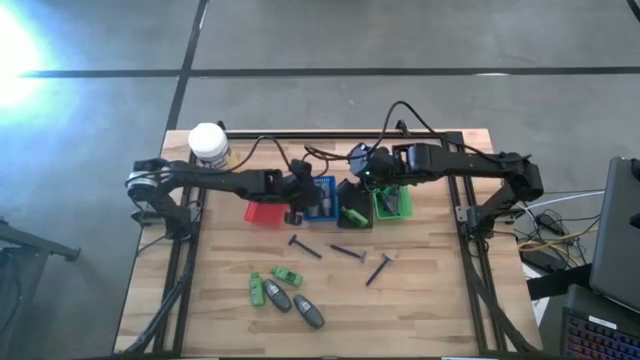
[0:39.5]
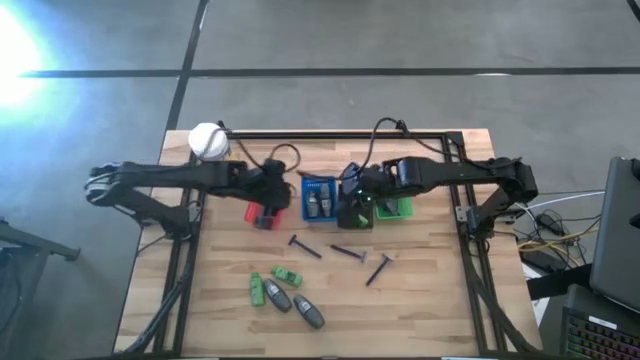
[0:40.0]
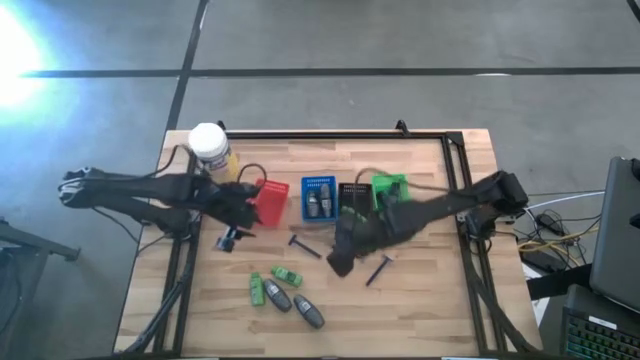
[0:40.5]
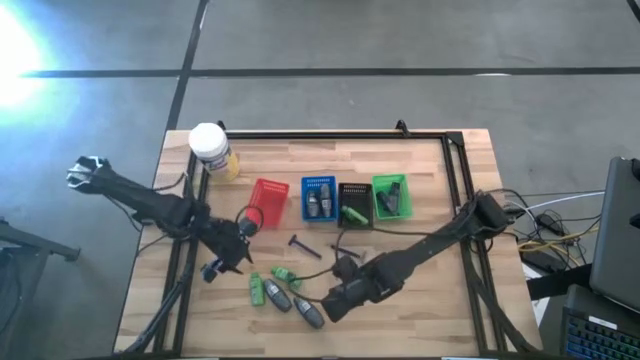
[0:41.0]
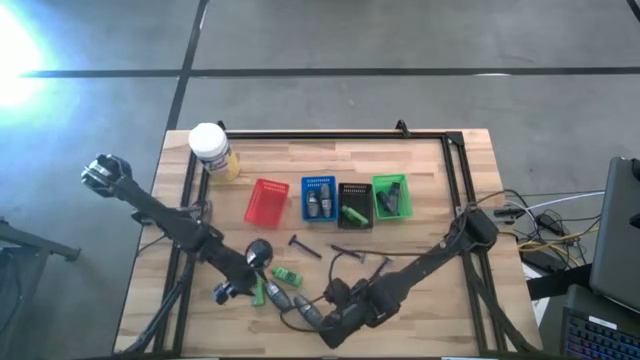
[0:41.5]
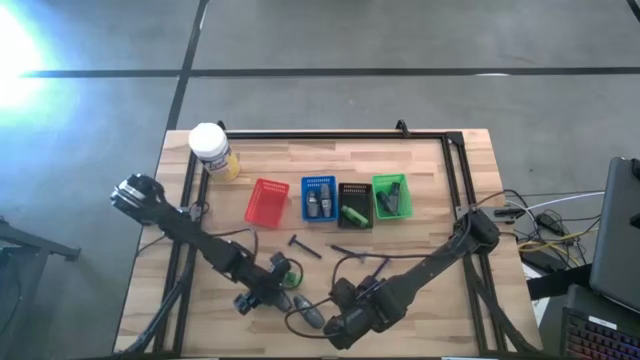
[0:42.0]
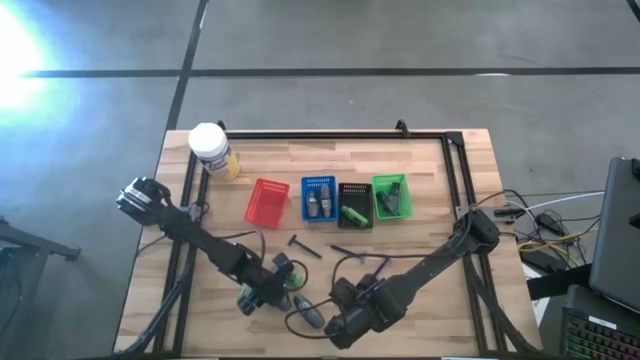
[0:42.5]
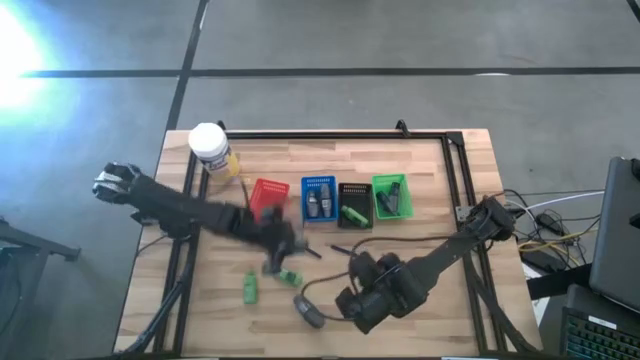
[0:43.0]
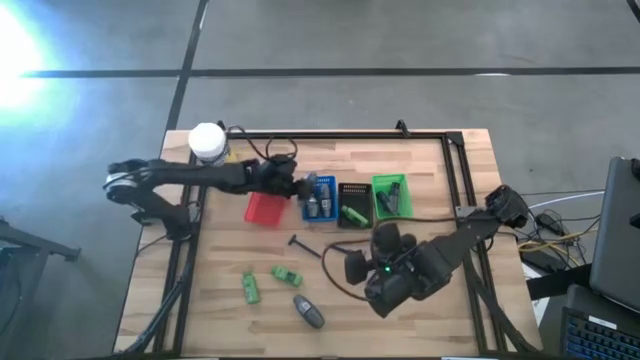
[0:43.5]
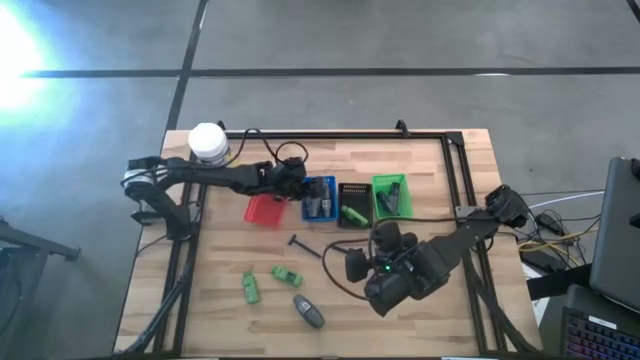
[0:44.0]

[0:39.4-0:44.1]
Task: Pick & Place Travel size toiletries
Put the black deodorant into the blue basket

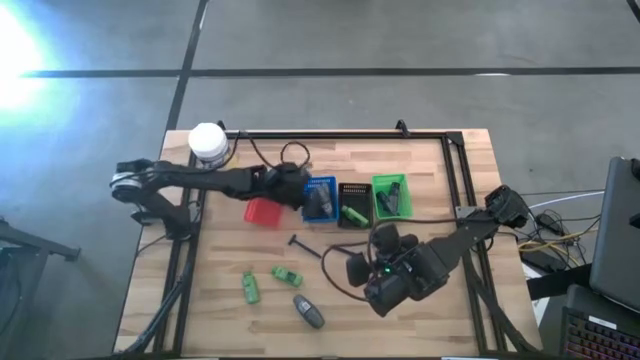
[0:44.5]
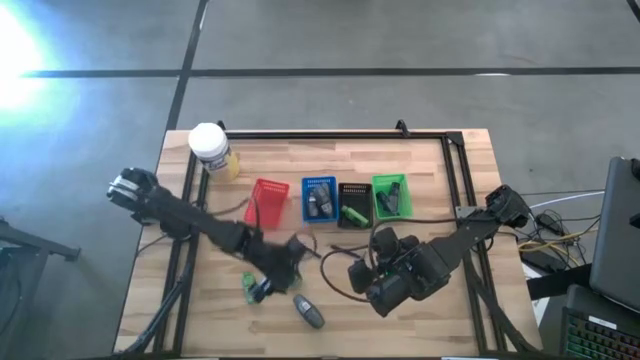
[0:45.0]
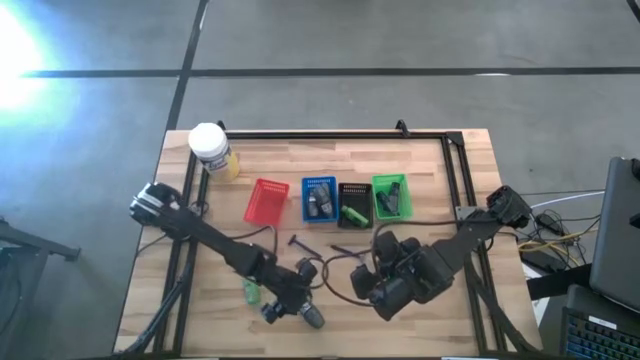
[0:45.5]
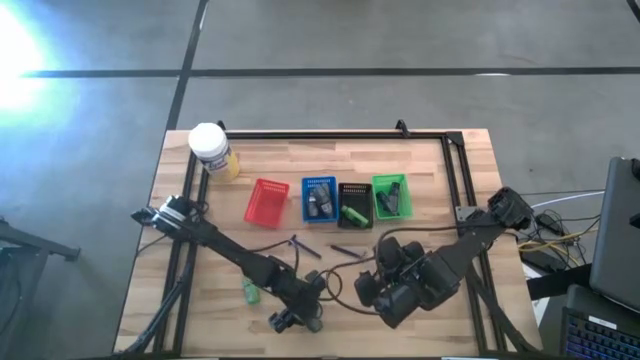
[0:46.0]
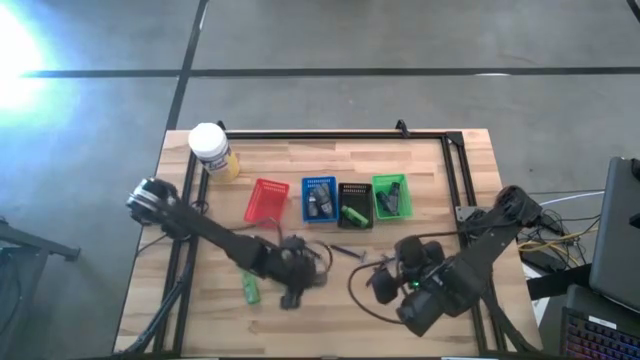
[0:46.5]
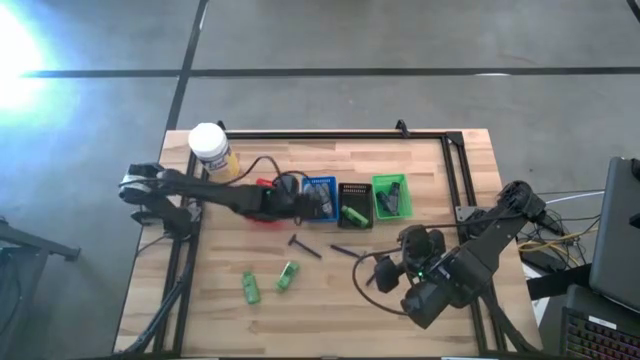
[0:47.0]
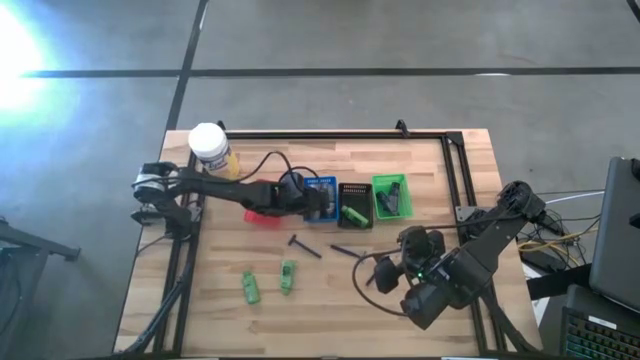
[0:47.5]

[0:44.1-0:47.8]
Put the black deodorant into the blue basket

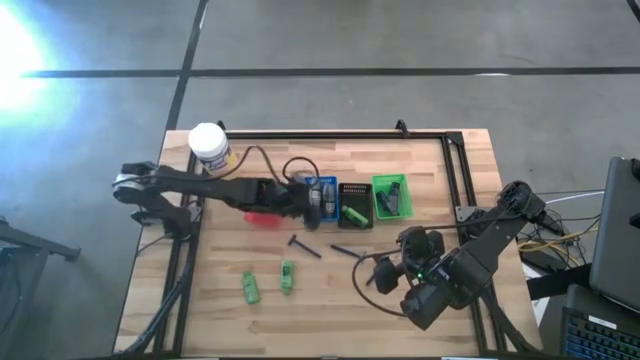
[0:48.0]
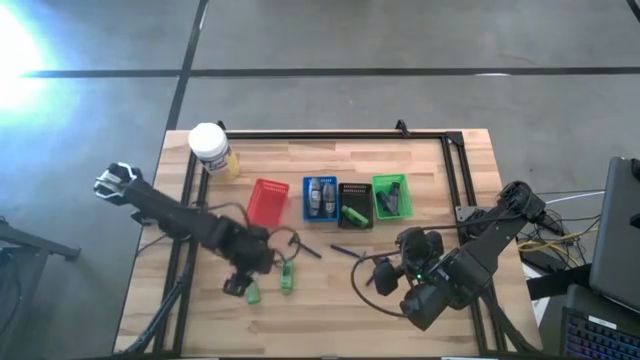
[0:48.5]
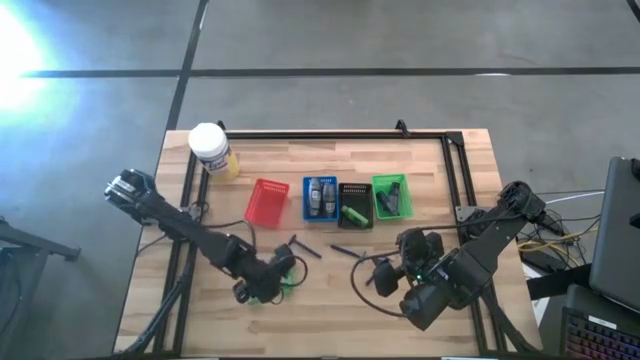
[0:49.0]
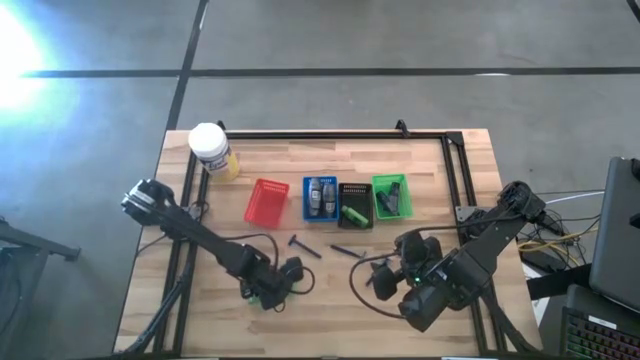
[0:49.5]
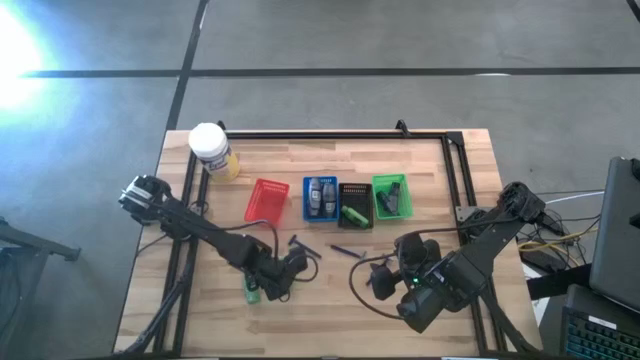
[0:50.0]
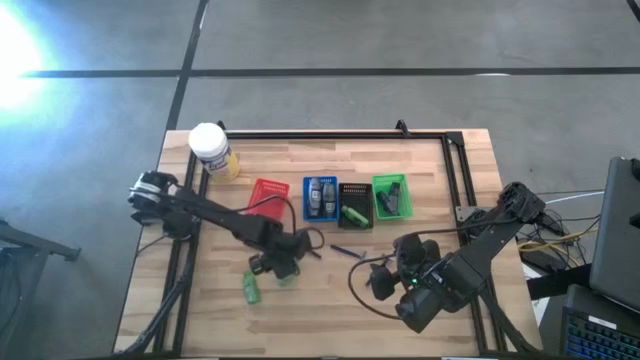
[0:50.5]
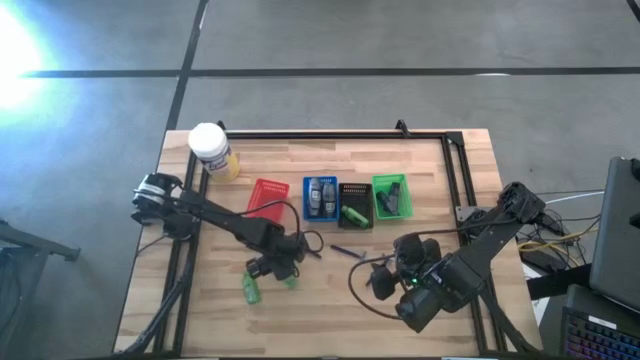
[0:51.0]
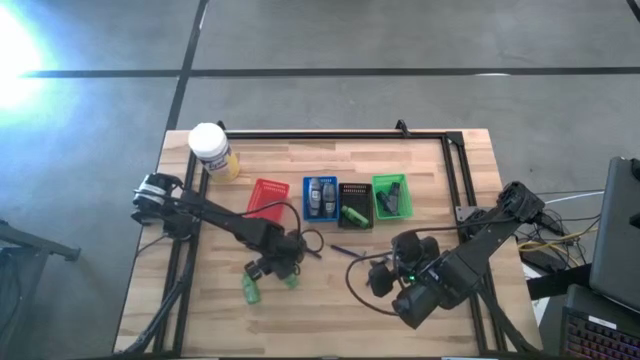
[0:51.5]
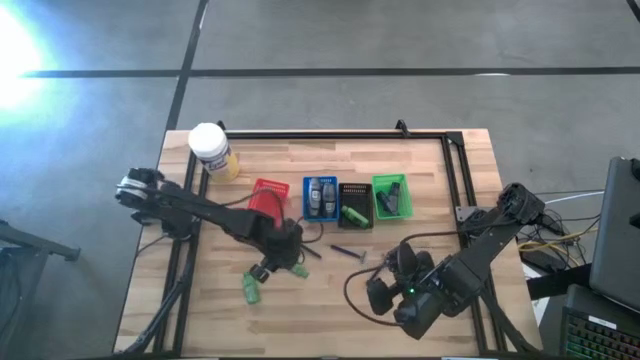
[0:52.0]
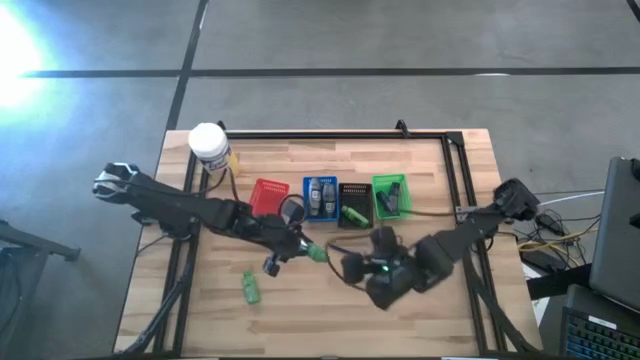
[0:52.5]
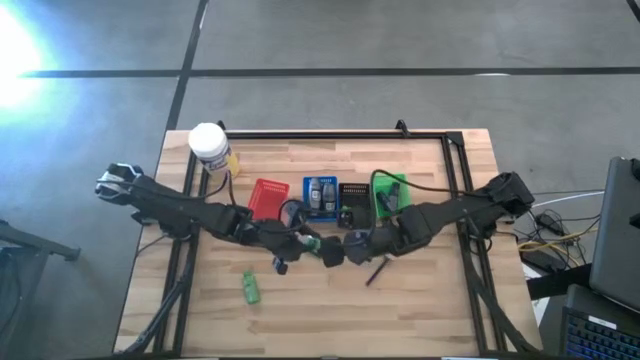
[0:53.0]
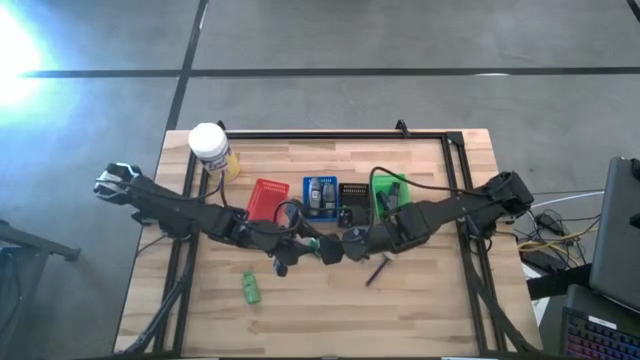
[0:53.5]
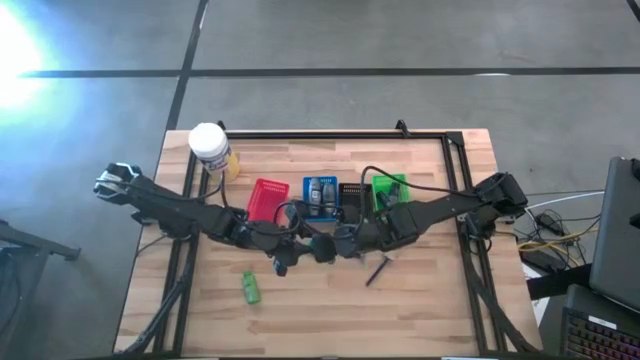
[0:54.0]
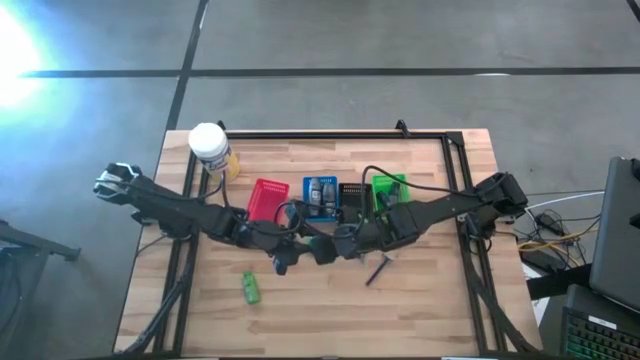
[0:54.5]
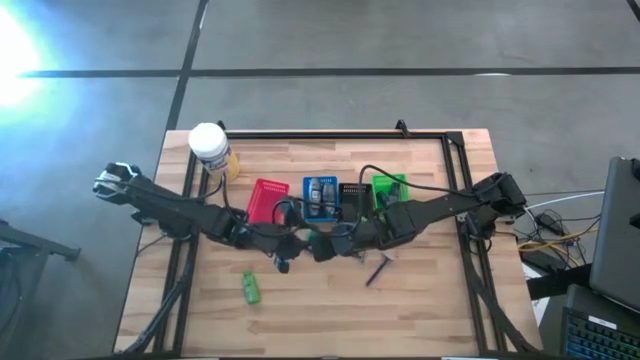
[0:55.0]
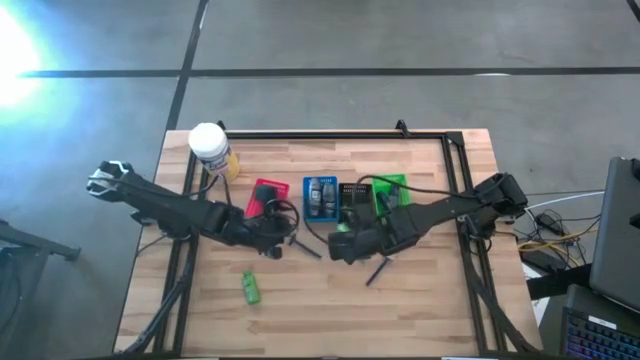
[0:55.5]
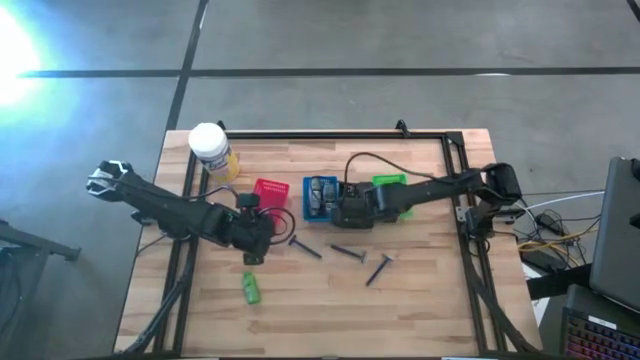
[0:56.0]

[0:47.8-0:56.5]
Put the green shampoo into the black basket

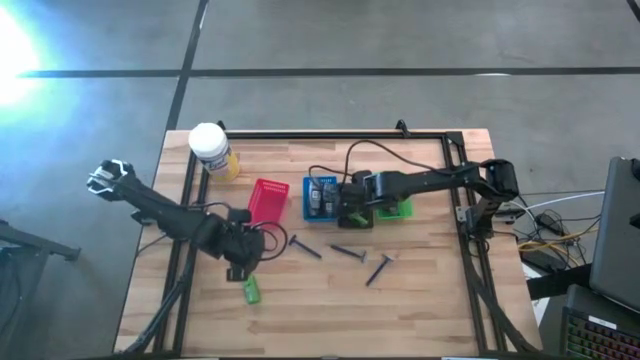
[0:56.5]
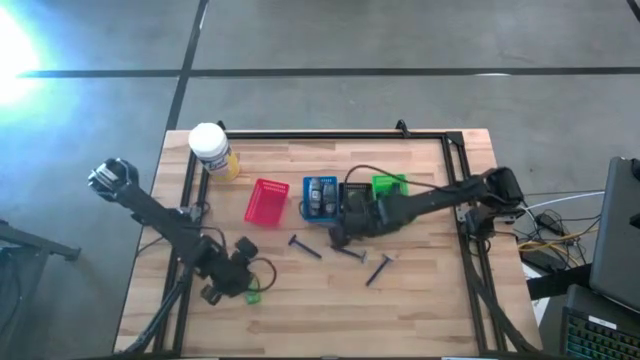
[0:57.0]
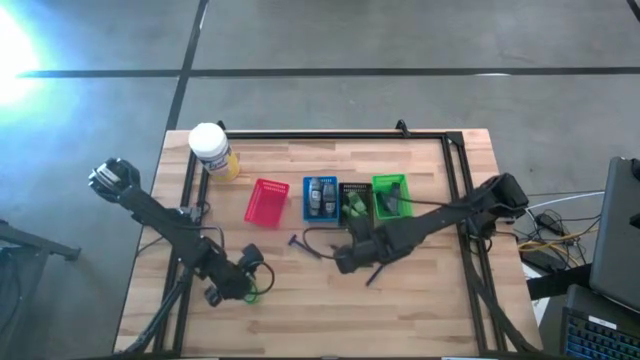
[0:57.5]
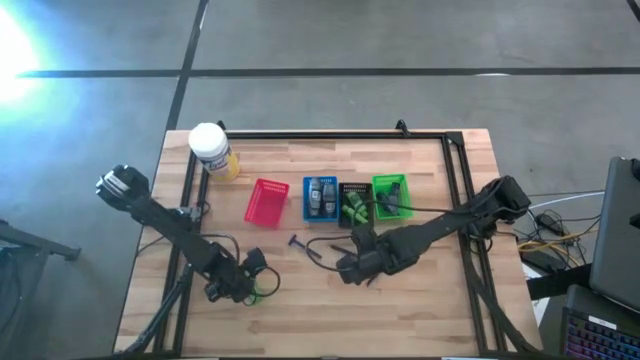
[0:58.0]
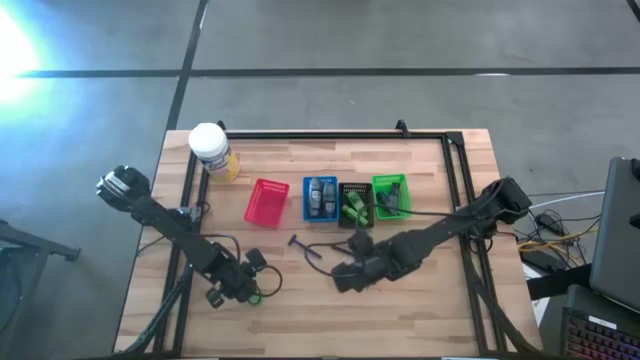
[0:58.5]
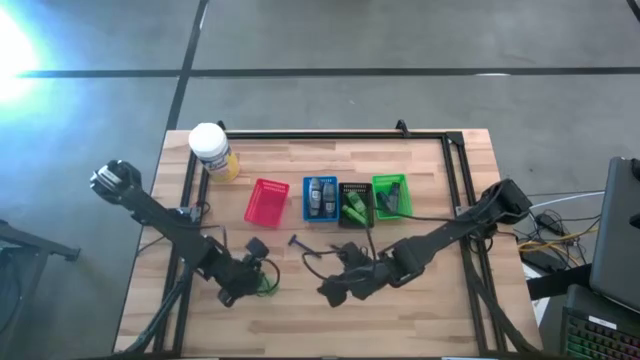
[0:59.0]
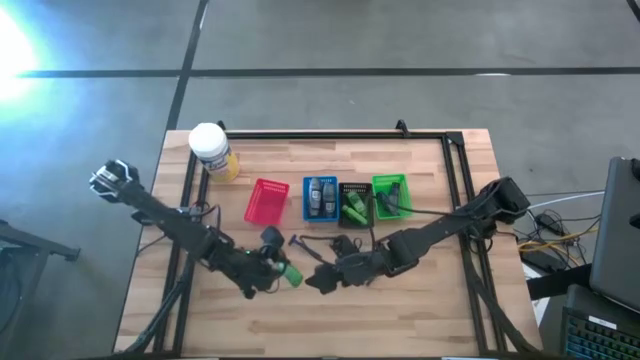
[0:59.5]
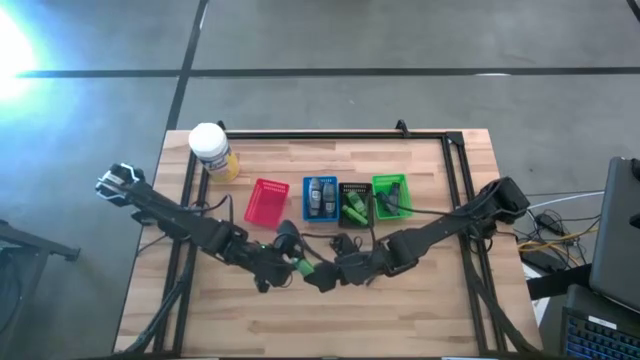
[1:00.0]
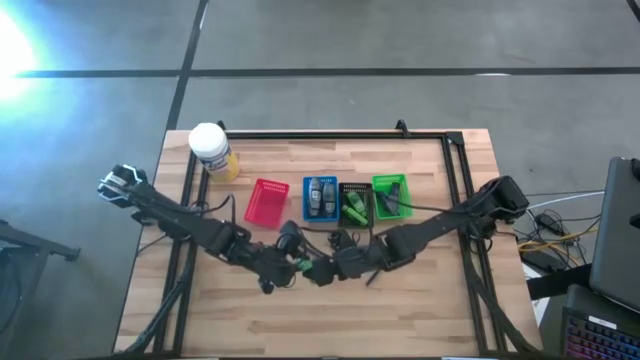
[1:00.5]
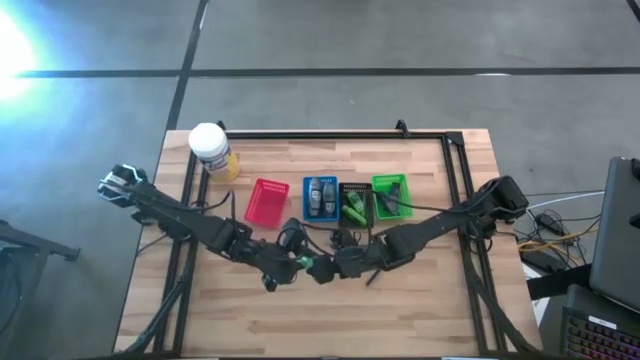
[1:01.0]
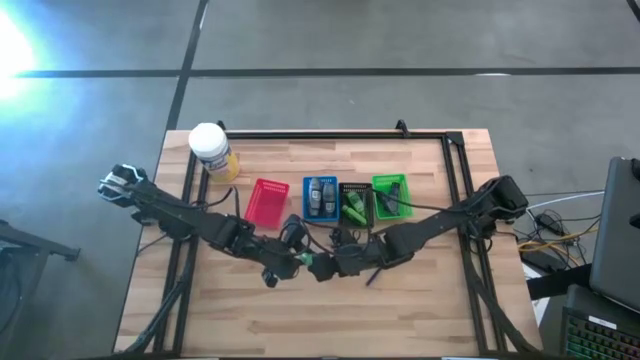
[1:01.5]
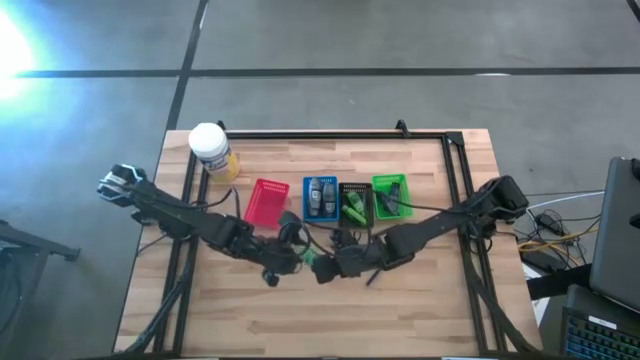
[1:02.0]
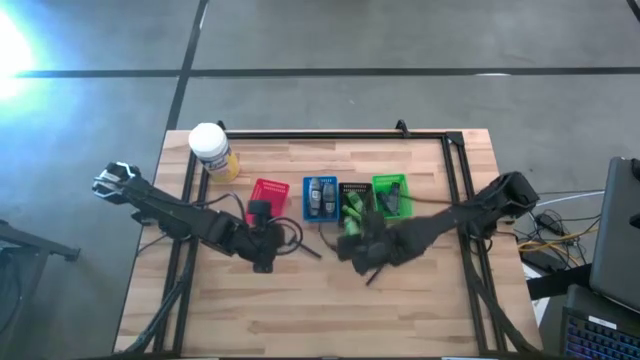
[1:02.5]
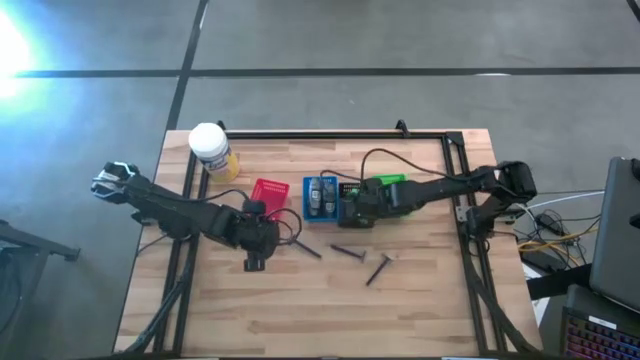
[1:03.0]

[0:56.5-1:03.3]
Put the green shampoo into the black basket
